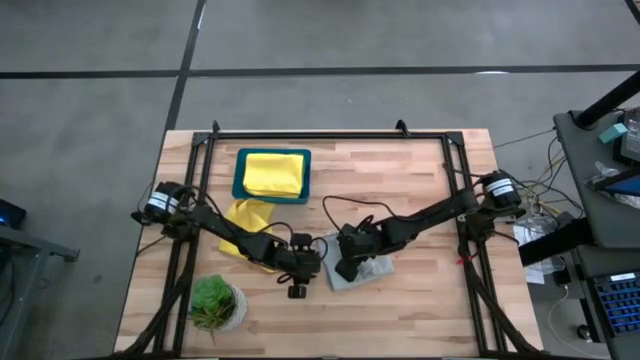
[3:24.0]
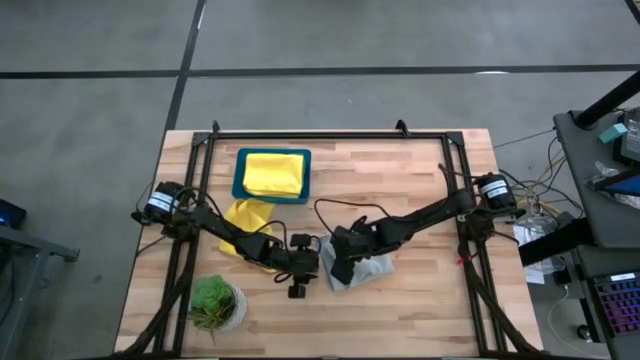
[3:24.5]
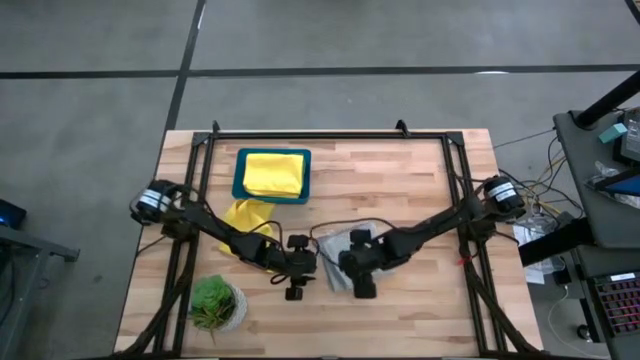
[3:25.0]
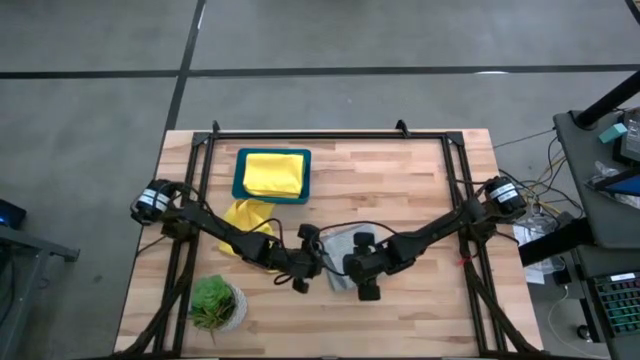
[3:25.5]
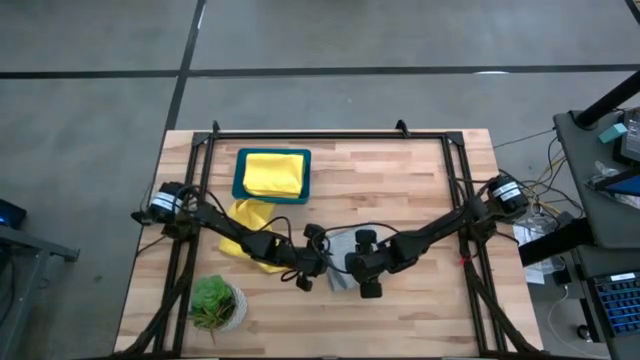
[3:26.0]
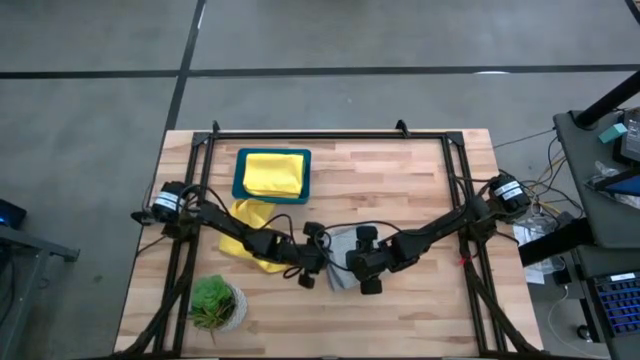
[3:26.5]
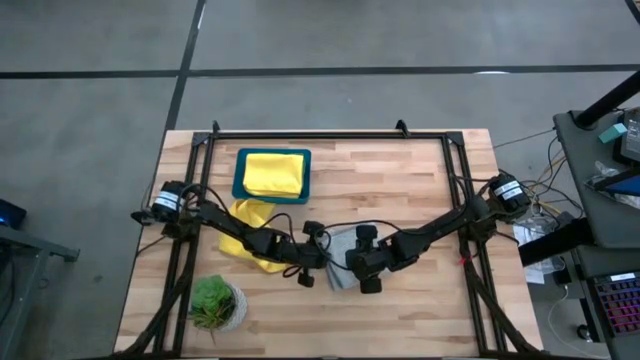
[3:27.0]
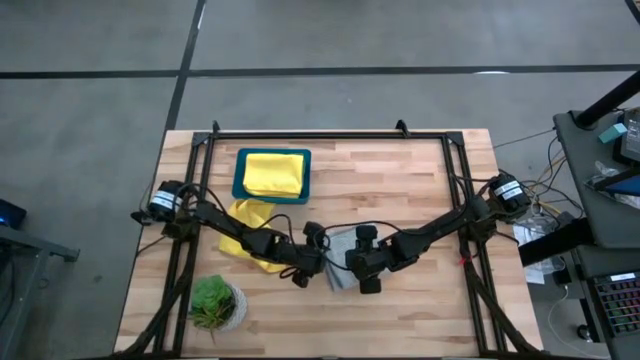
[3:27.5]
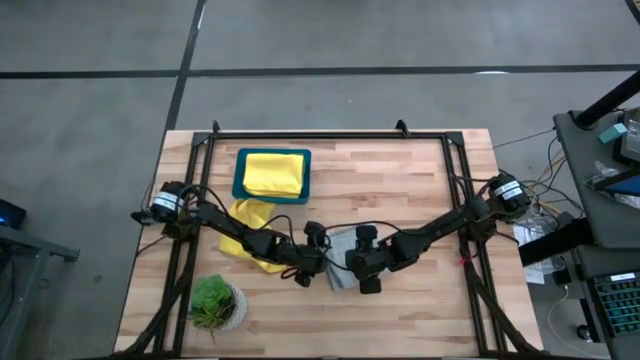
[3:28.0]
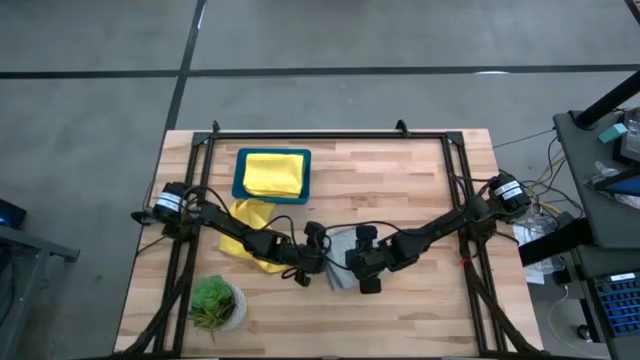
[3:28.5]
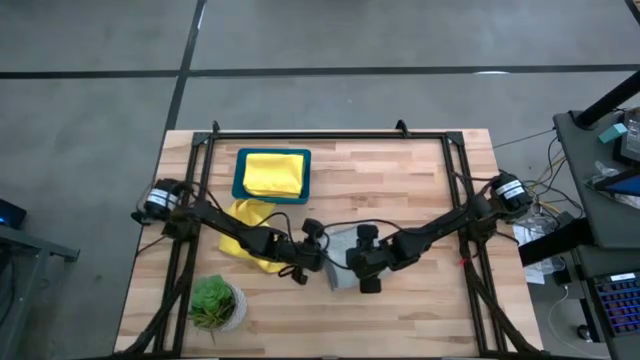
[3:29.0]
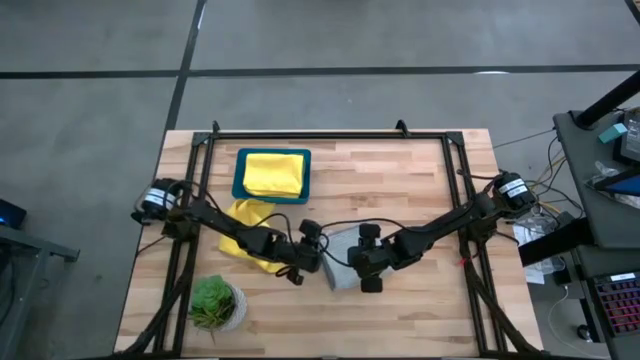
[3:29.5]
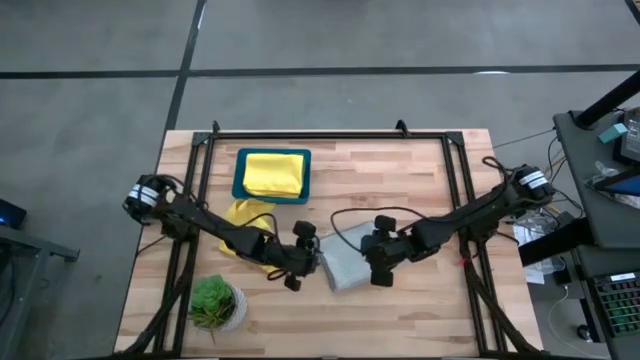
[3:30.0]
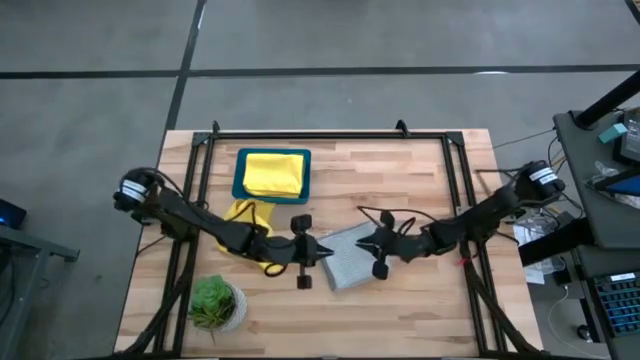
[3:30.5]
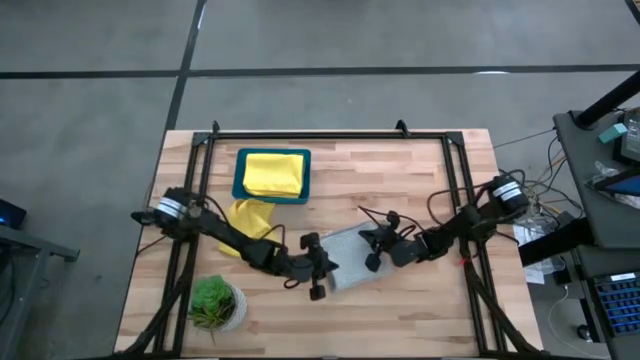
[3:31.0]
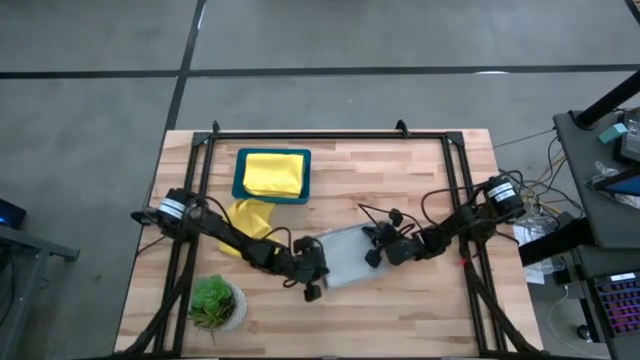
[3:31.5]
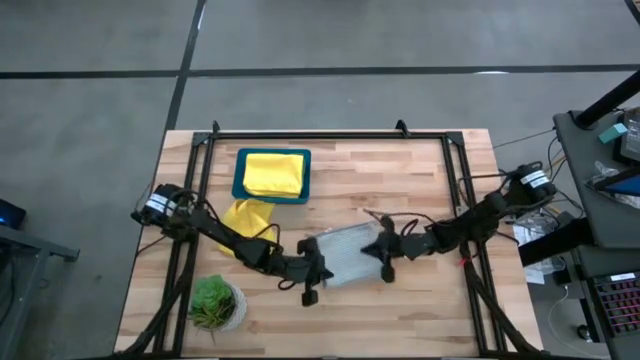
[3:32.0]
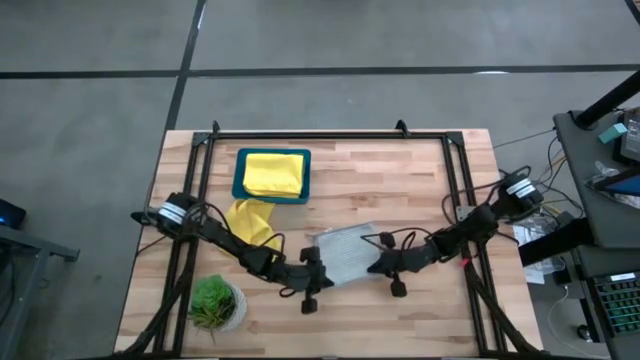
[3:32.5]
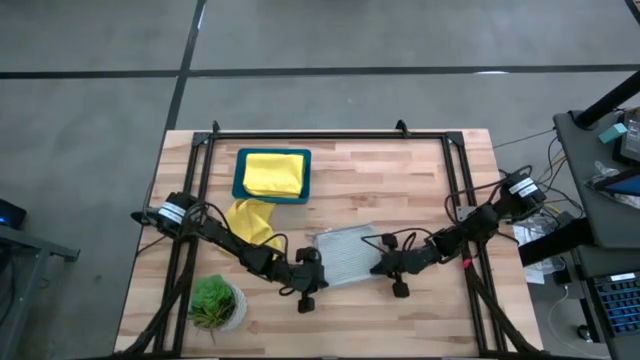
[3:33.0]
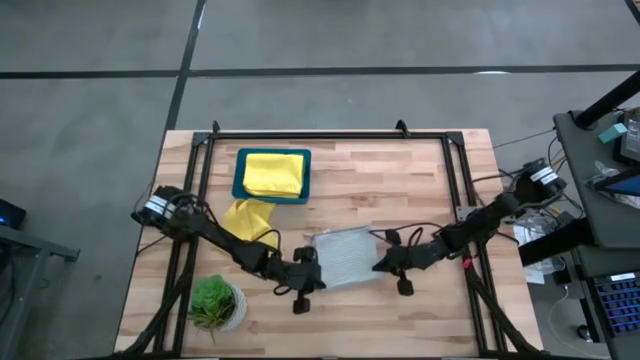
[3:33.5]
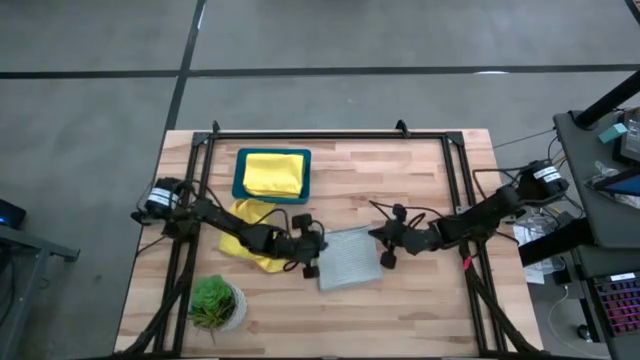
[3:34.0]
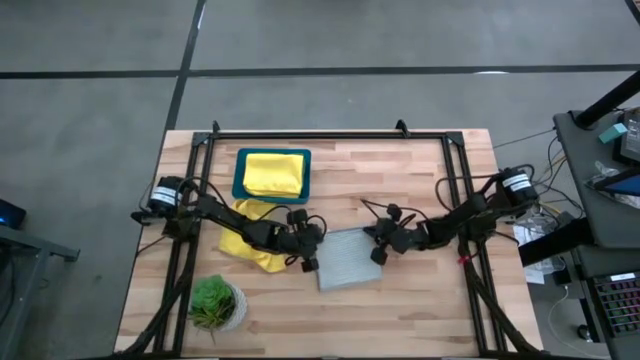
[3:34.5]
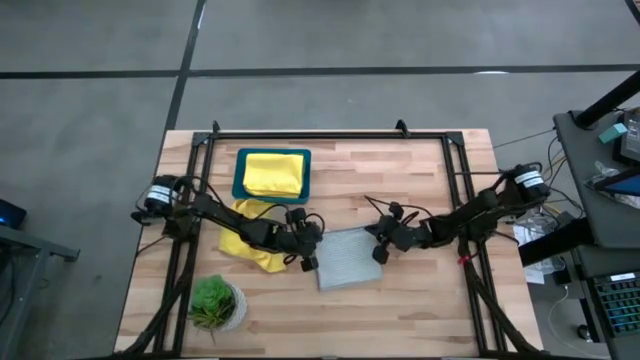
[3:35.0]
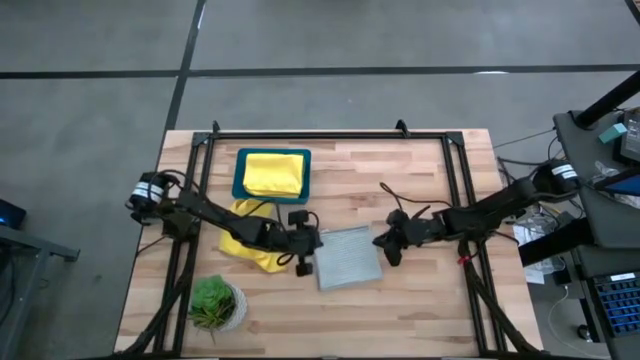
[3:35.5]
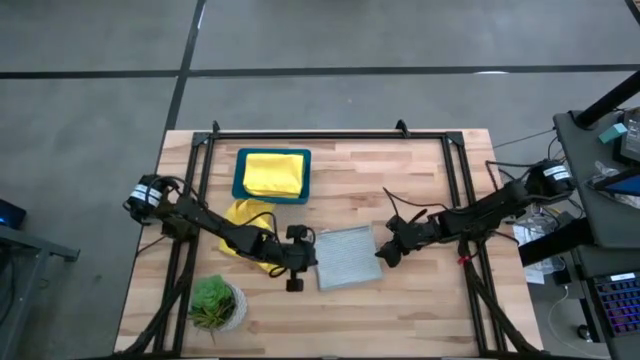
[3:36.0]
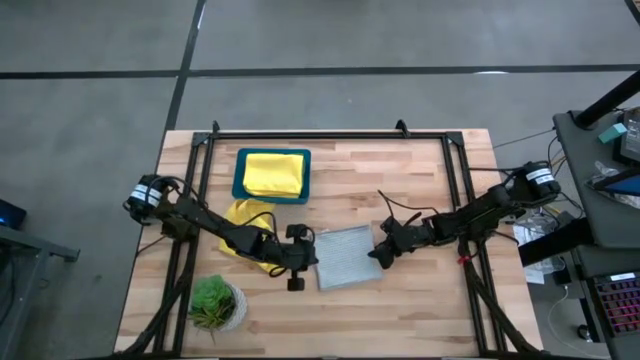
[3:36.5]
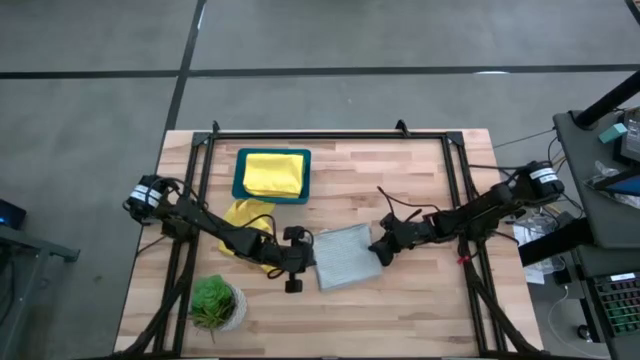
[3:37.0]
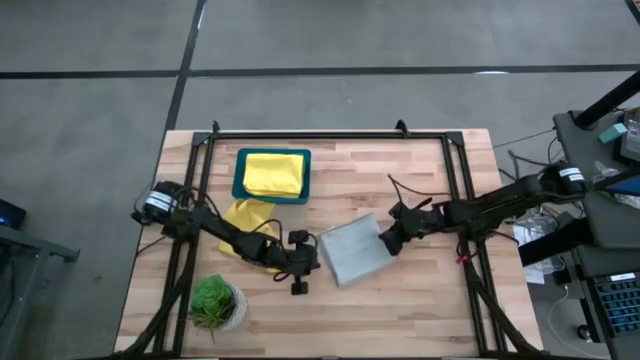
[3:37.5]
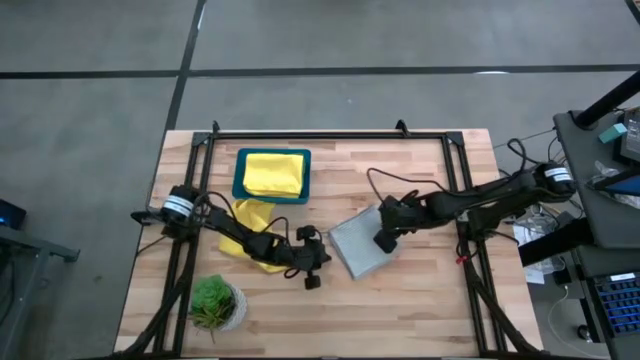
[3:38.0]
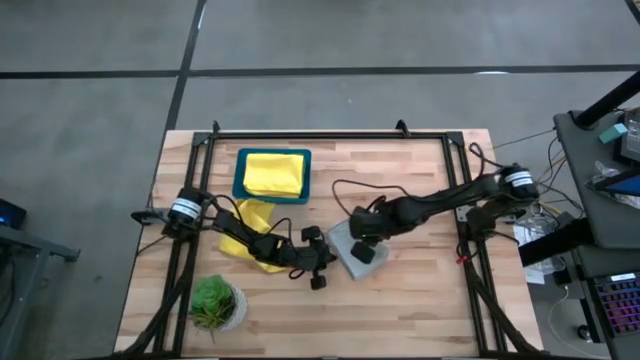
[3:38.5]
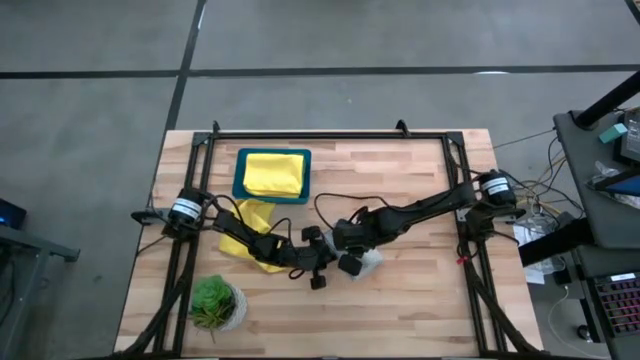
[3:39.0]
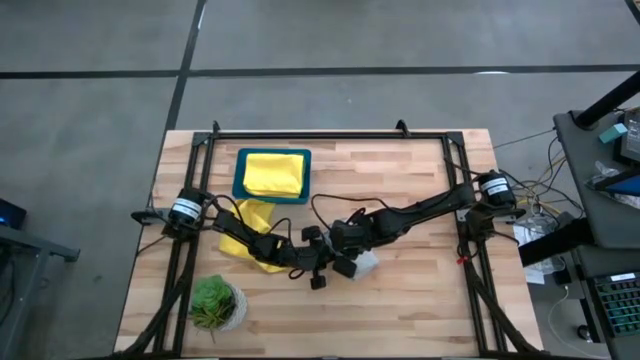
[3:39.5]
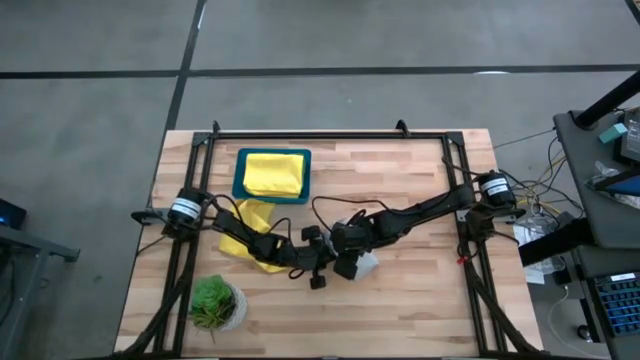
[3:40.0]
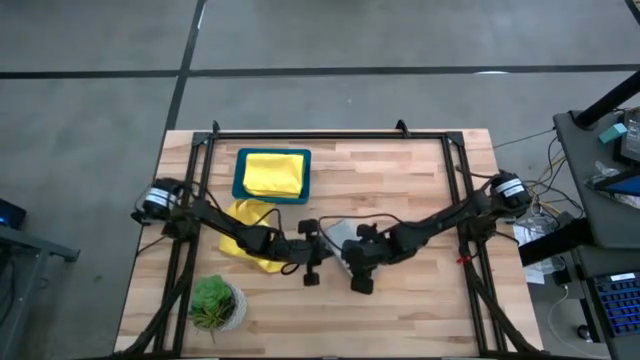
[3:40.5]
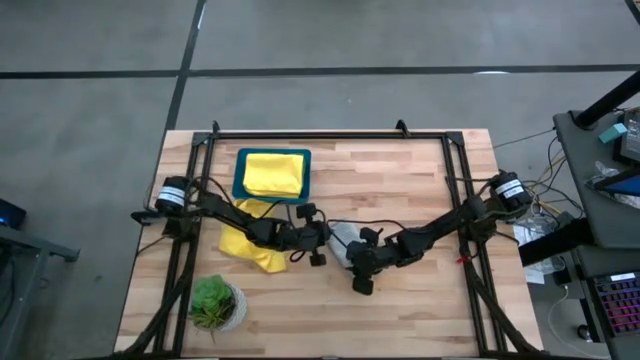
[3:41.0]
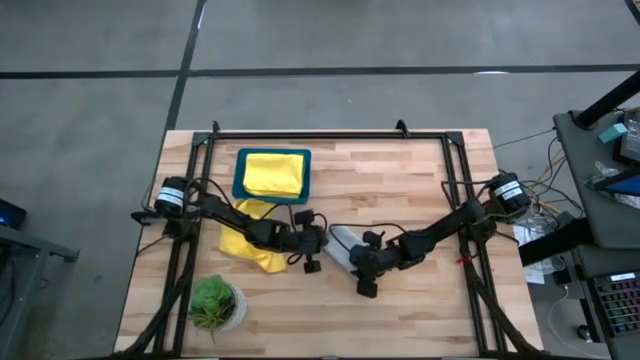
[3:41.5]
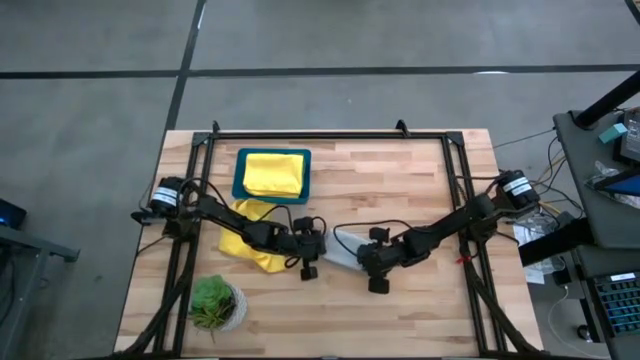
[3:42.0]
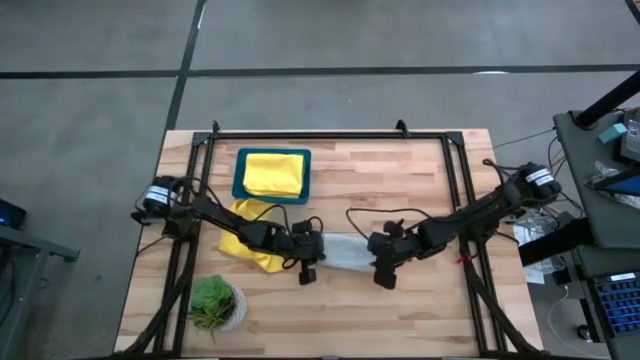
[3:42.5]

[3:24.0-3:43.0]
Task: Fold microfiber towels
Fold the gray microfiber towel

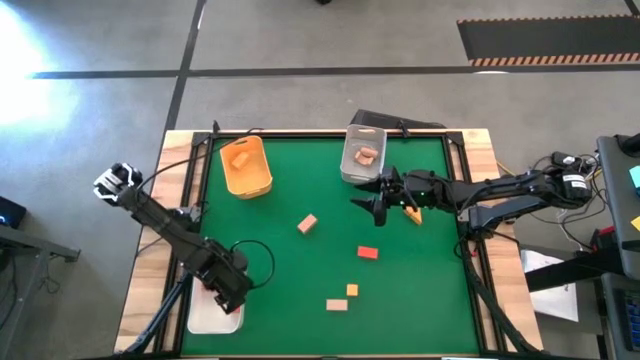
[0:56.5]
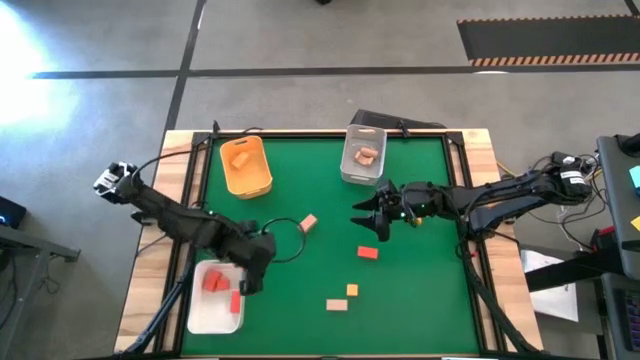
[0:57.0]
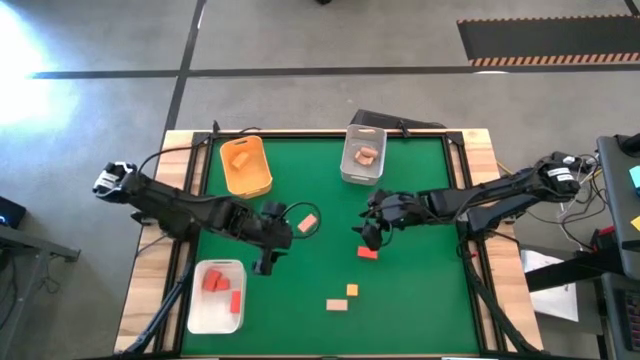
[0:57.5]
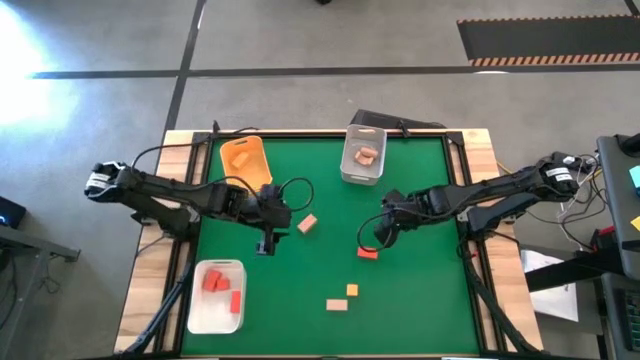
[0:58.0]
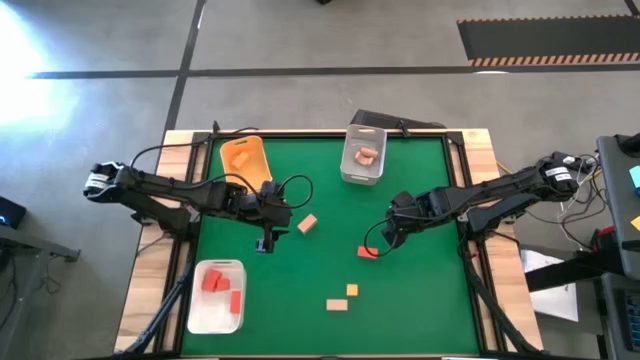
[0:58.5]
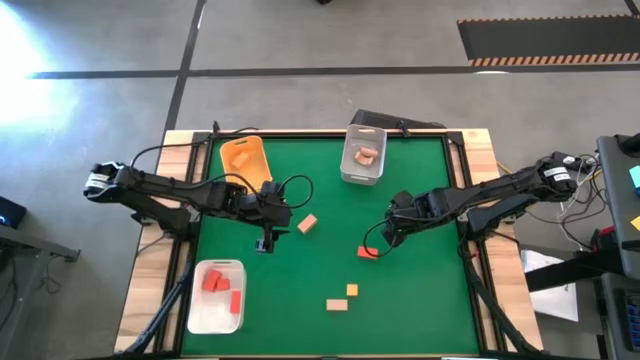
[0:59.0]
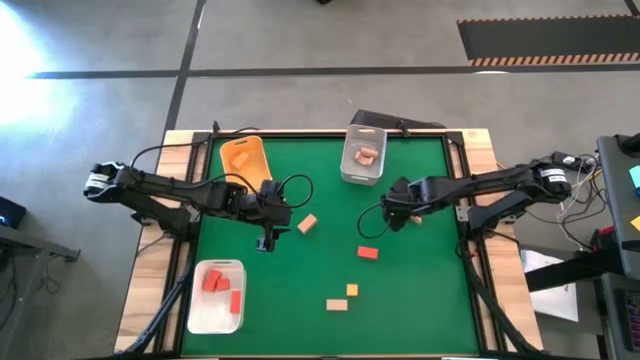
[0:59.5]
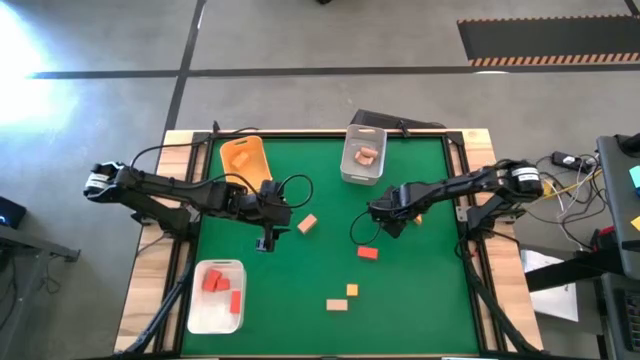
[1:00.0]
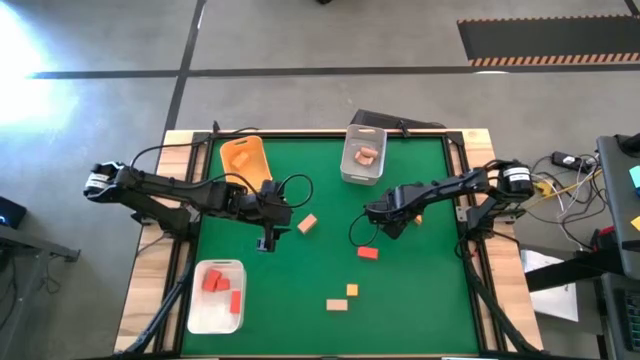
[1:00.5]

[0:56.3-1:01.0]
Task: Sort & place blocks by color
Put the yellow block into the yellow bin
